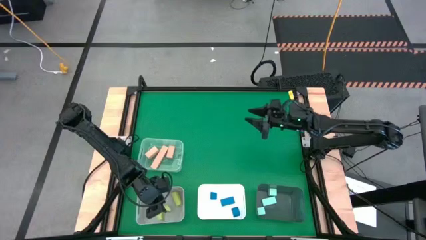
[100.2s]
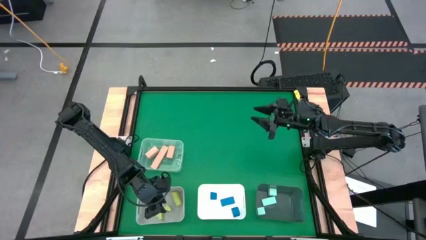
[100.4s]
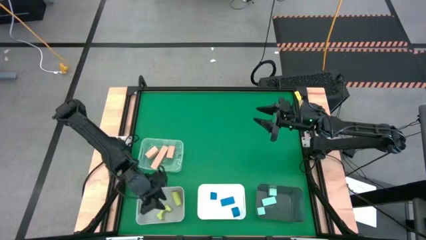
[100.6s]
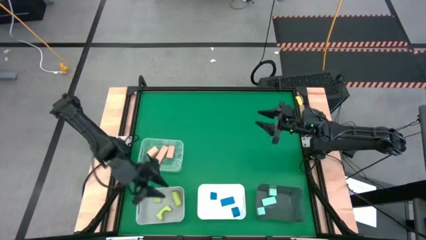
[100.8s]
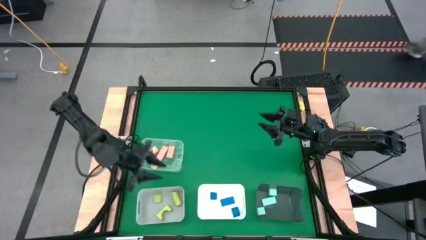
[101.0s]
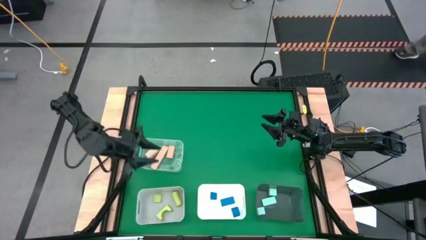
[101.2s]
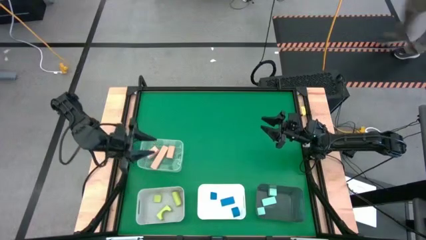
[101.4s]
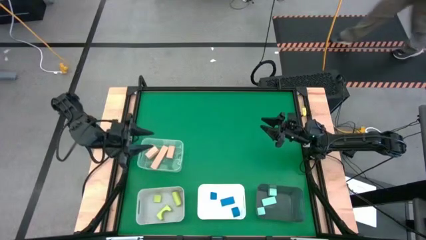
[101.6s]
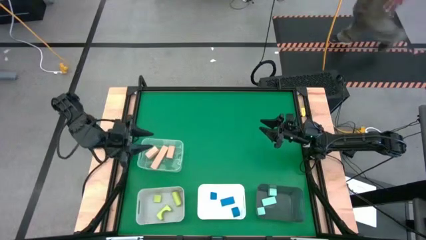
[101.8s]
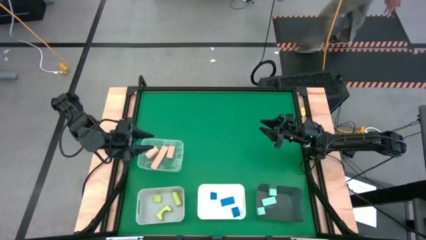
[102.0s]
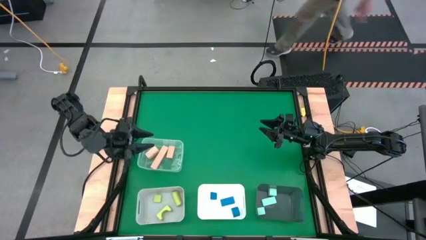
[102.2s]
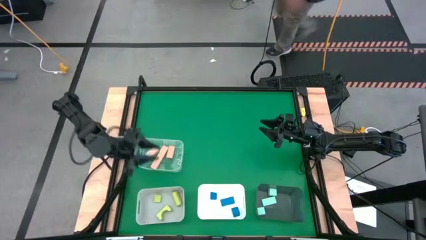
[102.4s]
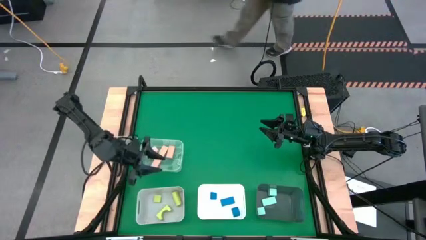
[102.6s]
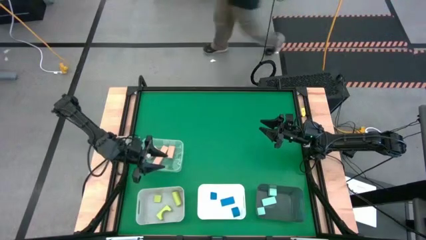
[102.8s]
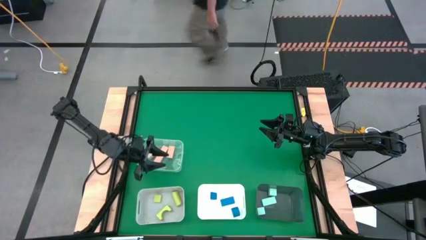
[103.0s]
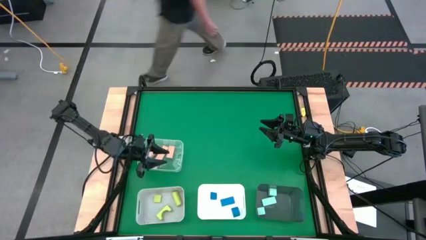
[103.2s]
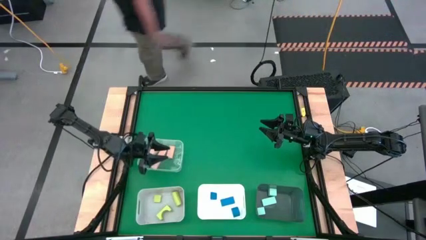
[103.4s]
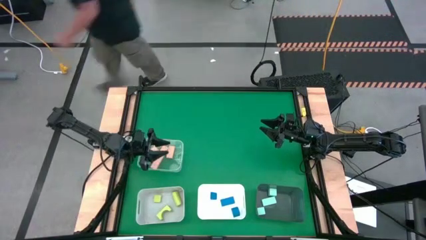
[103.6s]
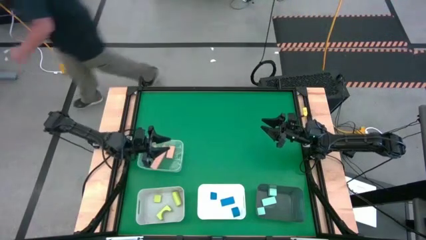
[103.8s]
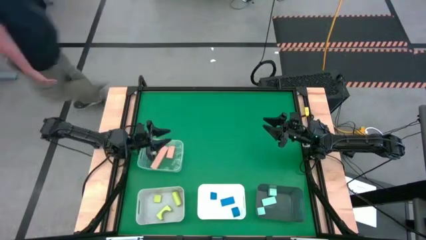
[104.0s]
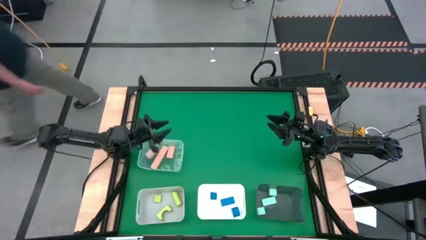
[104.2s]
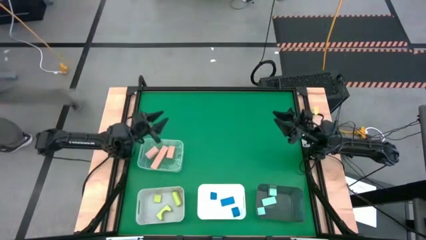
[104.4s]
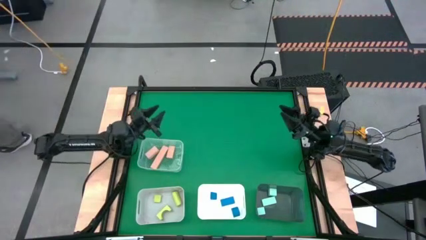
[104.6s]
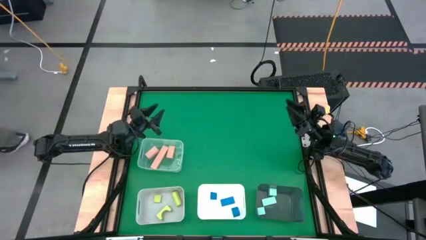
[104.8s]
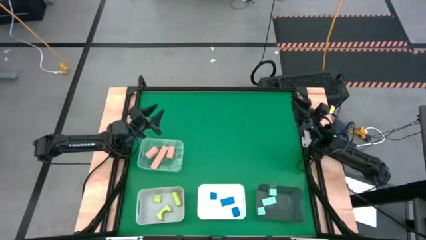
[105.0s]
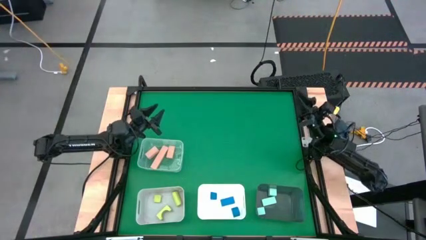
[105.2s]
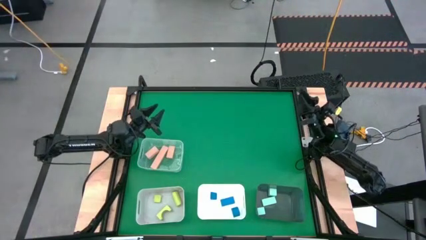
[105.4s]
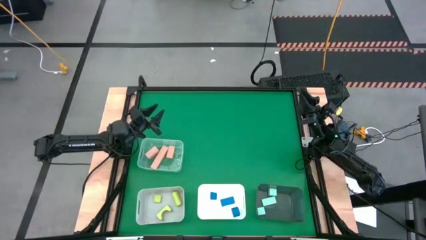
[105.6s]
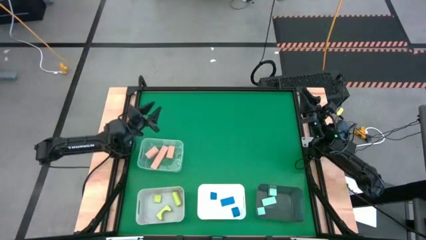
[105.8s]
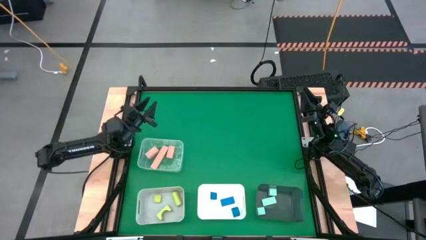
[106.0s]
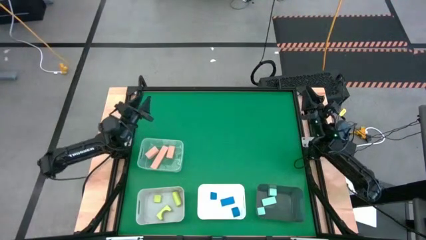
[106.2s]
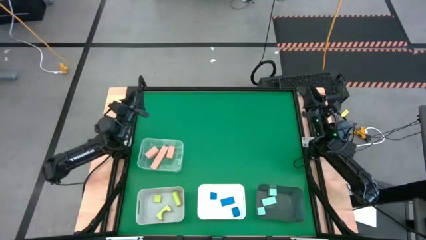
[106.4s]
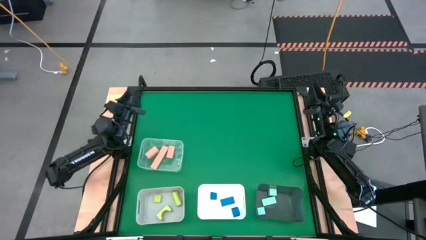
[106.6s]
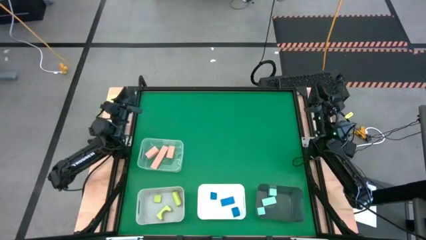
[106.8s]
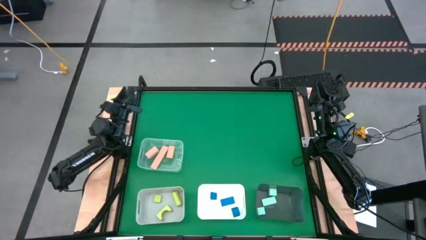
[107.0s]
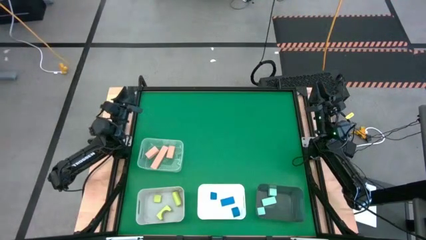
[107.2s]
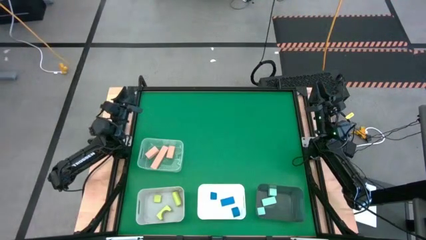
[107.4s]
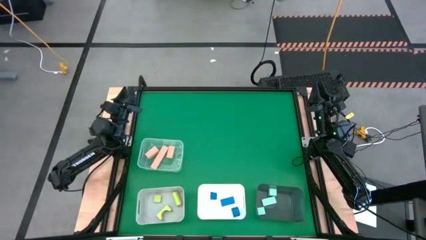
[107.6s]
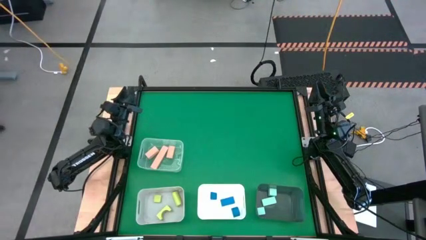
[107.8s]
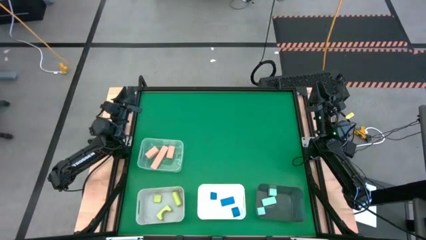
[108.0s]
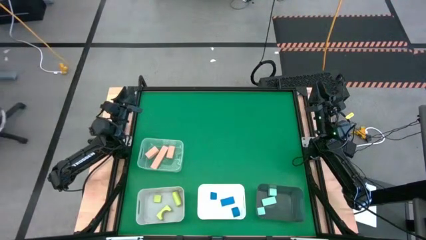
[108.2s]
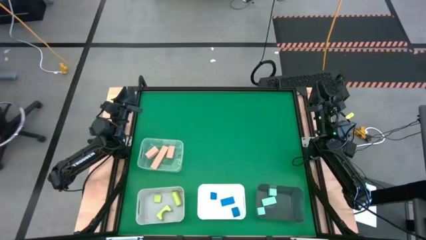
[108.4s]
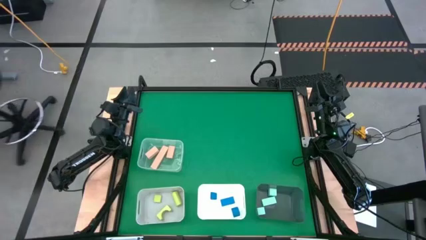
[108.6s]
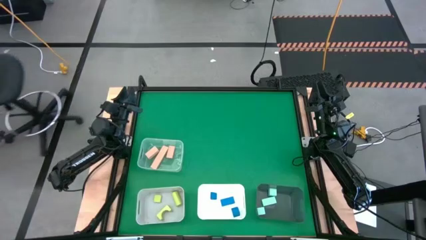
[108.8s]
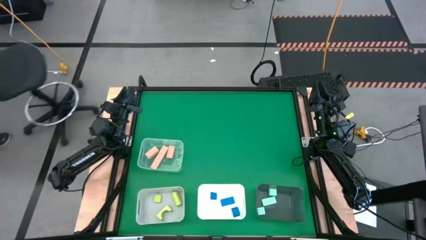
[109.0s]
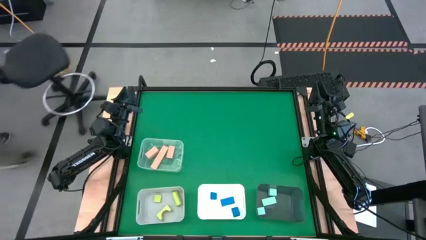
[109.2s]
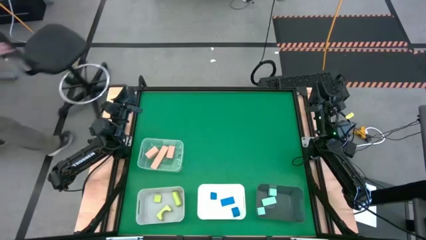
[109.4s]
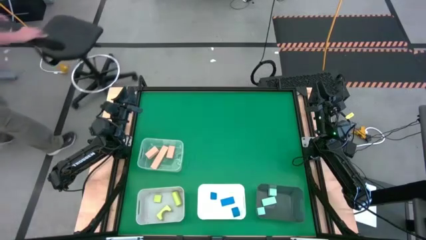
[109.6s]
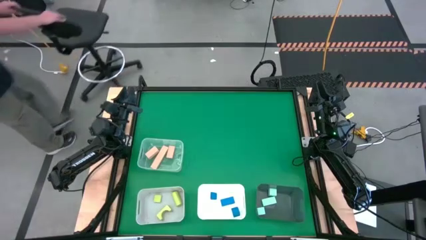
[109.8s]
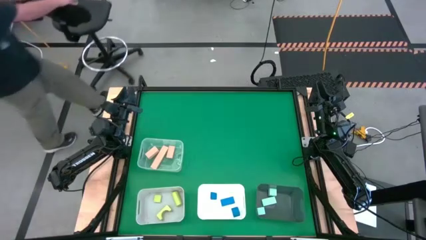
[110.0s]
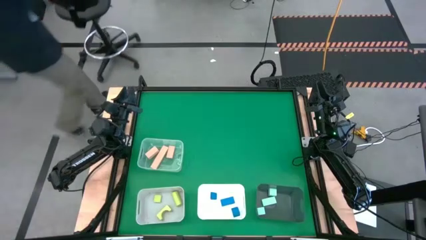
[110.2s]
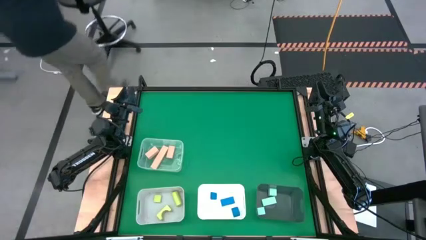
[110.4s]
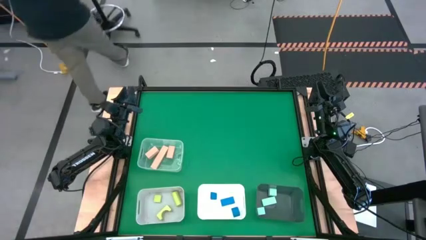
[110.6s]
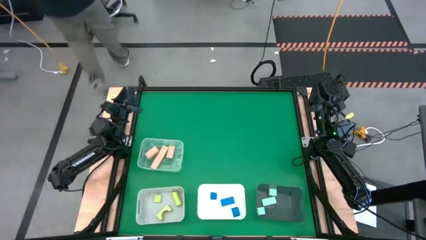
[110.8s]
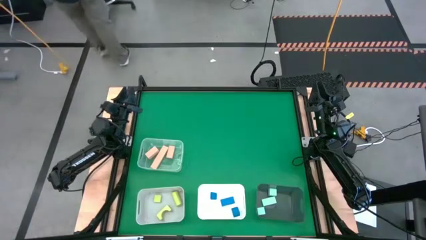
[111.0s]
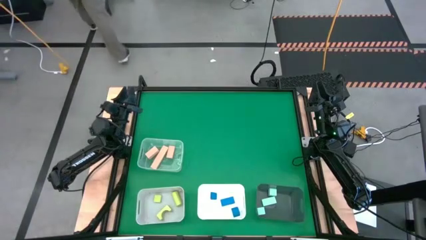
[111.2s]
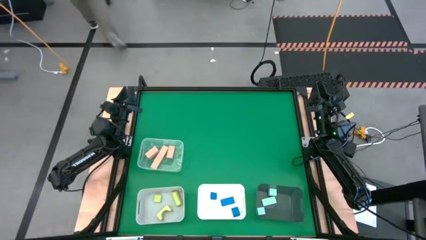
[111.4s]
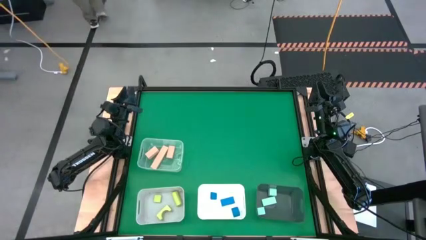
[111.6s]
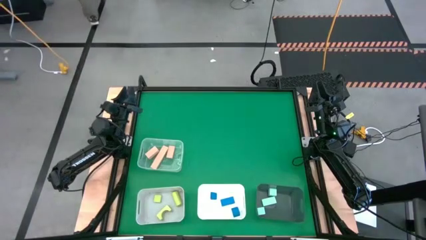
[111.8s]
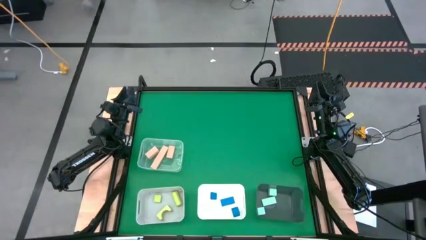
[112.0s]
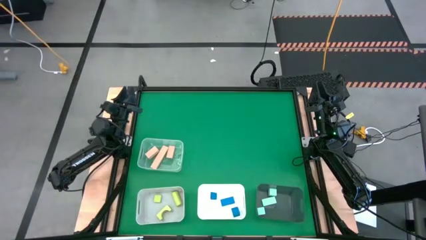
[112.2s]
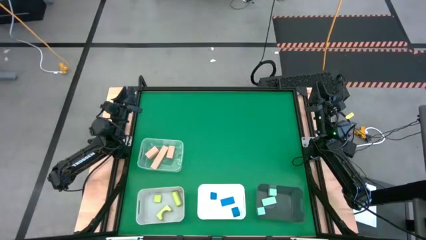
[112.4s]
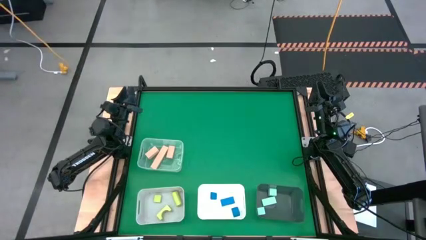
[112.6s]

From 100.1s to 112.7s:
Task: Sort & place blocks by color
Return to Home Position
